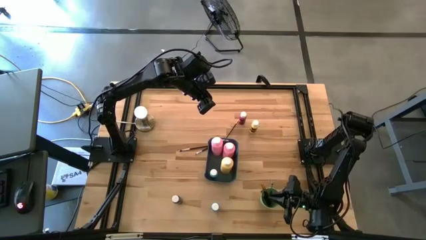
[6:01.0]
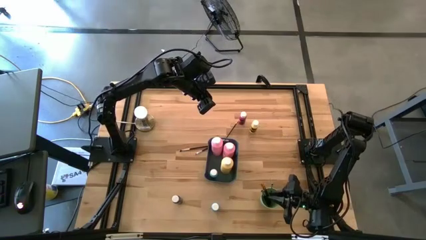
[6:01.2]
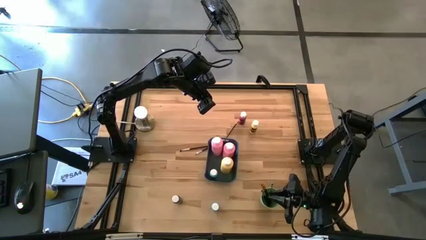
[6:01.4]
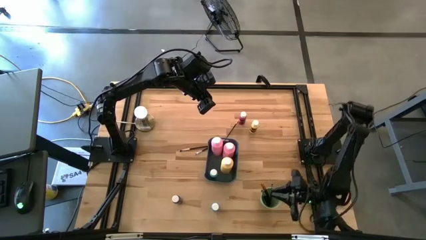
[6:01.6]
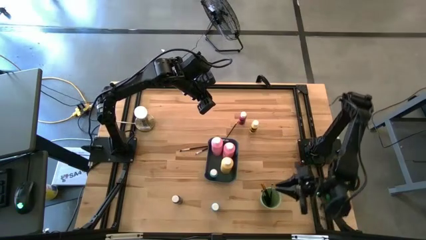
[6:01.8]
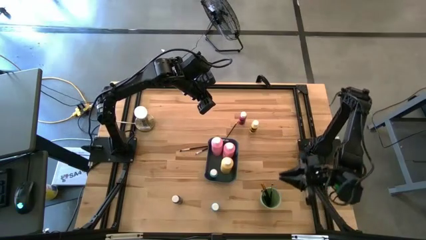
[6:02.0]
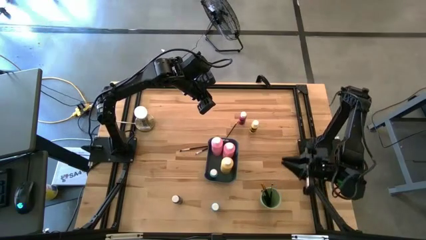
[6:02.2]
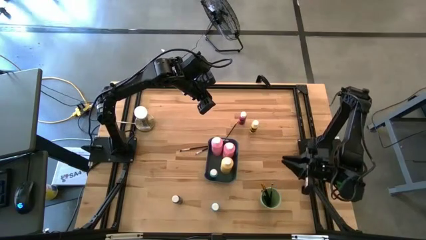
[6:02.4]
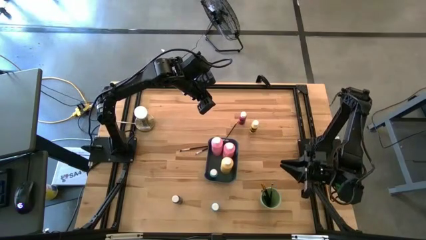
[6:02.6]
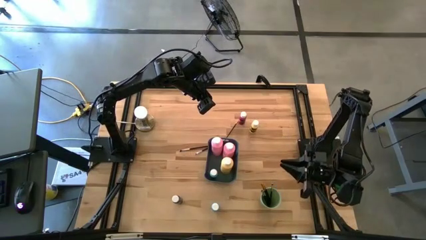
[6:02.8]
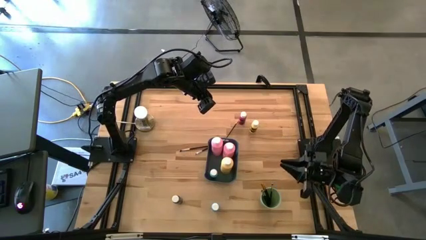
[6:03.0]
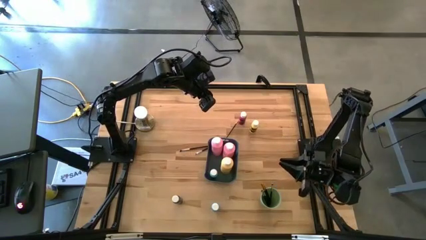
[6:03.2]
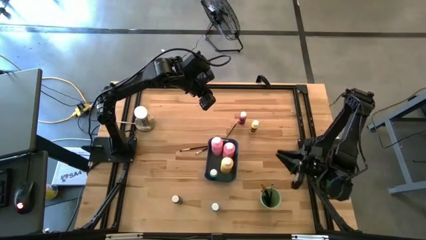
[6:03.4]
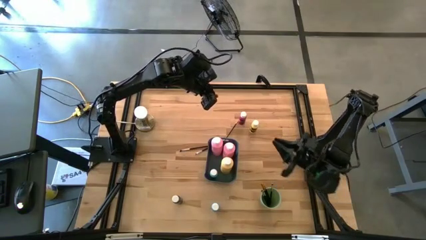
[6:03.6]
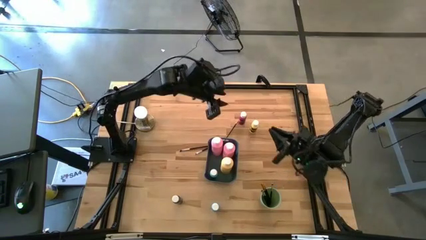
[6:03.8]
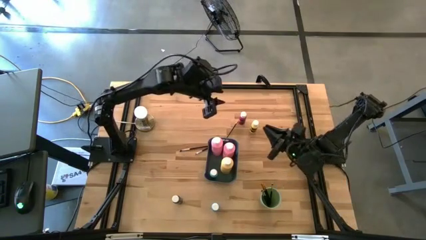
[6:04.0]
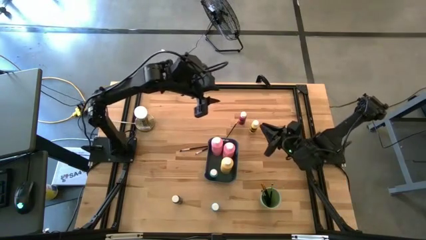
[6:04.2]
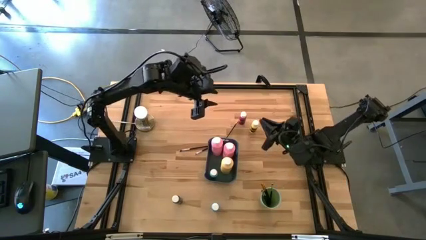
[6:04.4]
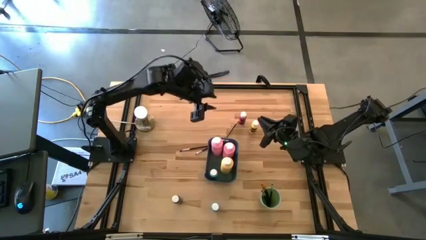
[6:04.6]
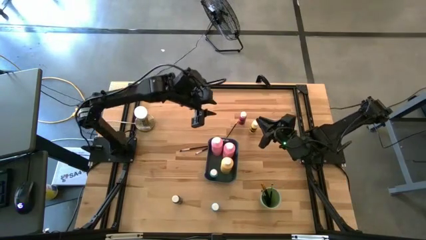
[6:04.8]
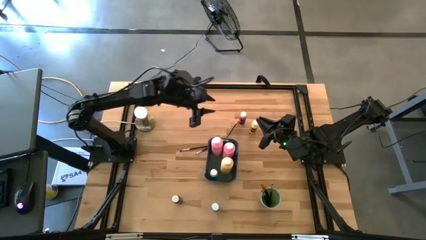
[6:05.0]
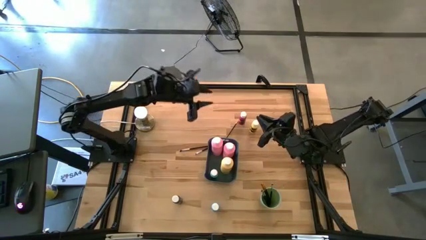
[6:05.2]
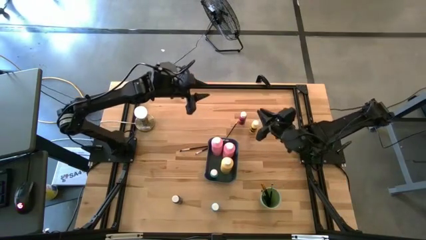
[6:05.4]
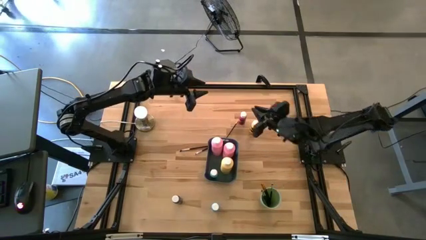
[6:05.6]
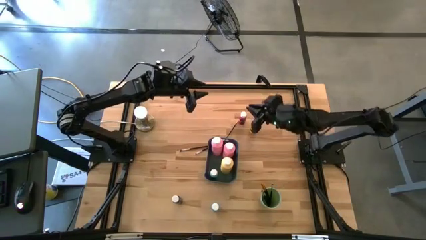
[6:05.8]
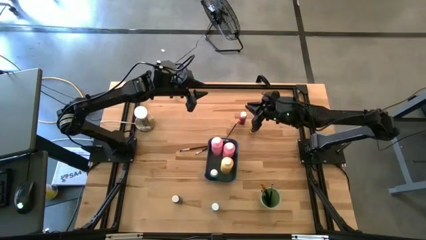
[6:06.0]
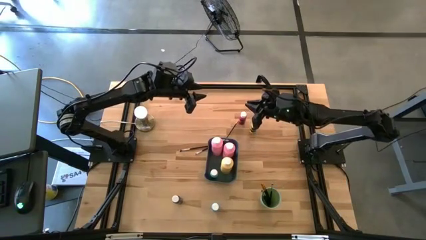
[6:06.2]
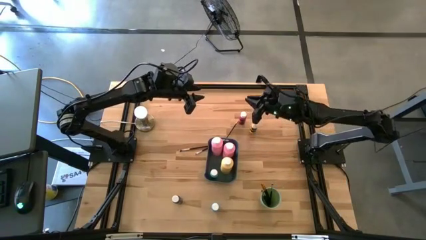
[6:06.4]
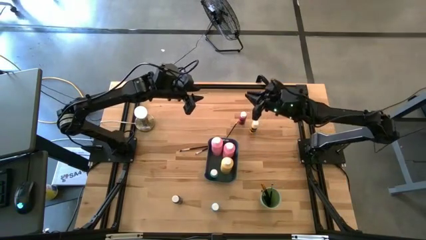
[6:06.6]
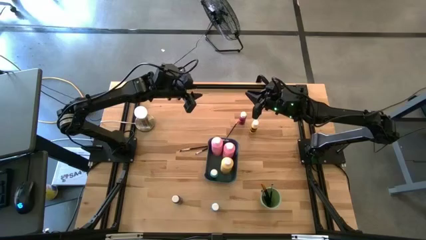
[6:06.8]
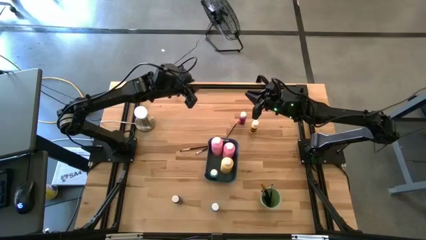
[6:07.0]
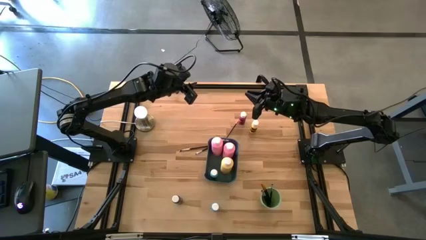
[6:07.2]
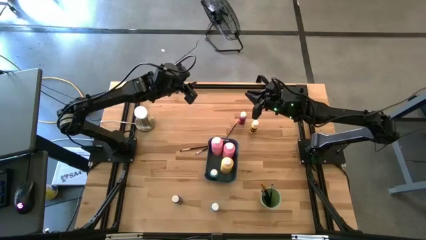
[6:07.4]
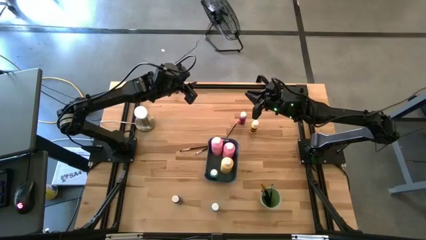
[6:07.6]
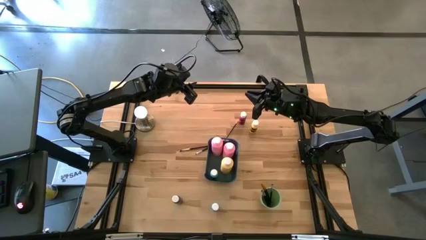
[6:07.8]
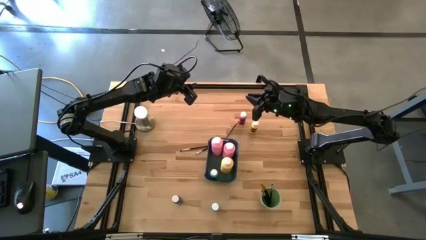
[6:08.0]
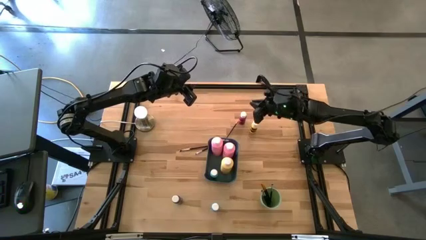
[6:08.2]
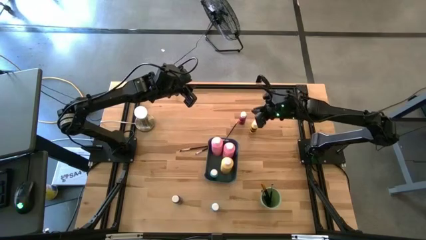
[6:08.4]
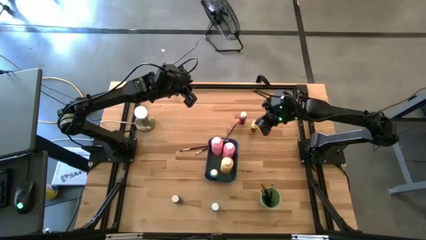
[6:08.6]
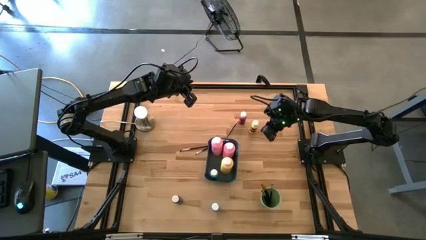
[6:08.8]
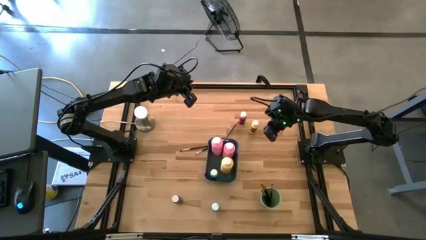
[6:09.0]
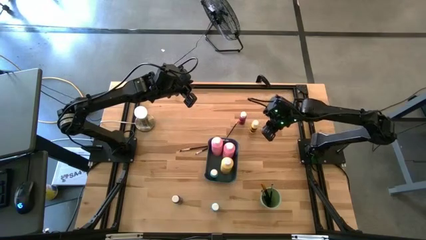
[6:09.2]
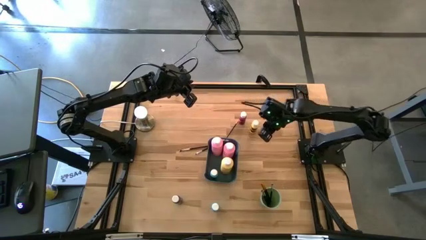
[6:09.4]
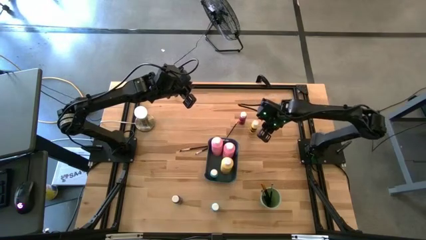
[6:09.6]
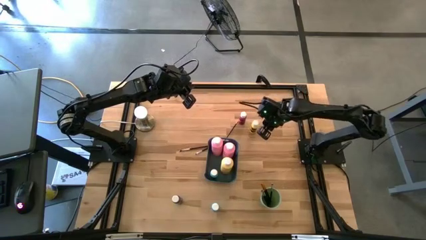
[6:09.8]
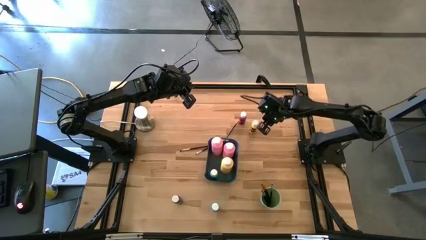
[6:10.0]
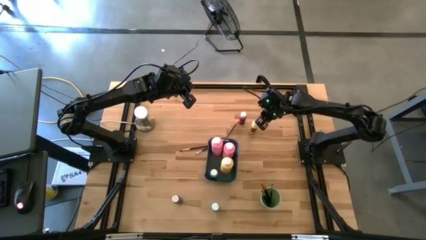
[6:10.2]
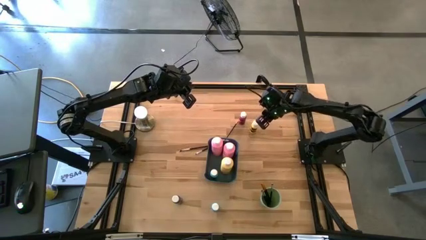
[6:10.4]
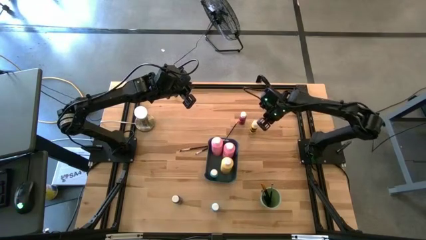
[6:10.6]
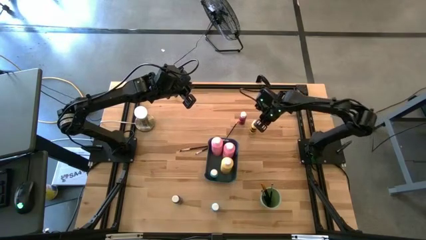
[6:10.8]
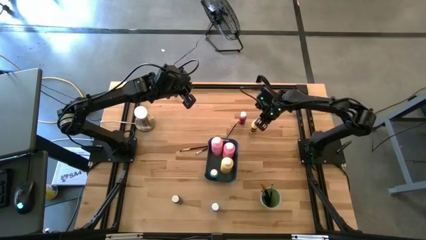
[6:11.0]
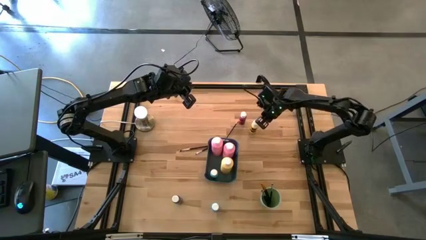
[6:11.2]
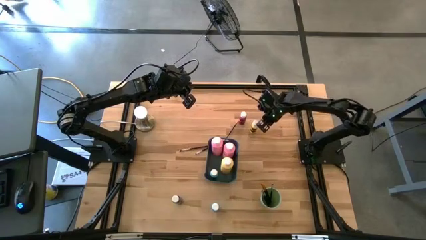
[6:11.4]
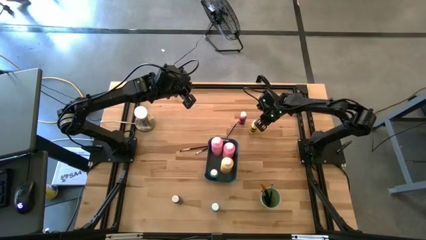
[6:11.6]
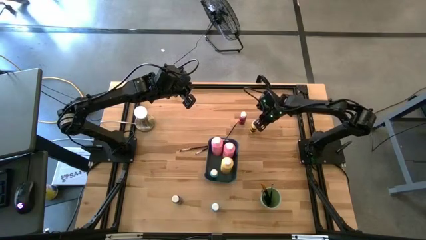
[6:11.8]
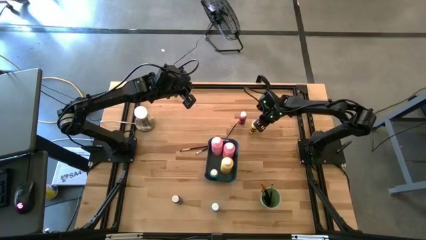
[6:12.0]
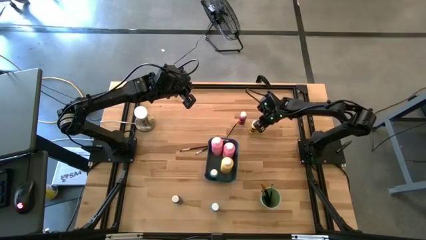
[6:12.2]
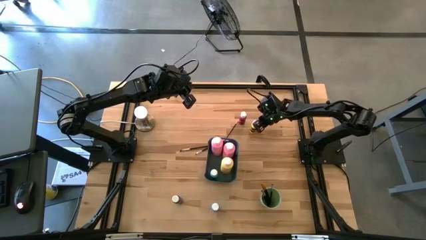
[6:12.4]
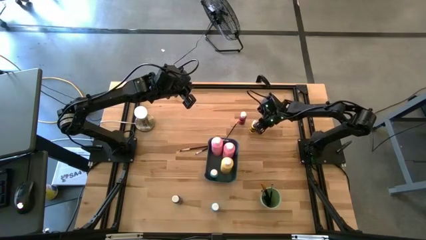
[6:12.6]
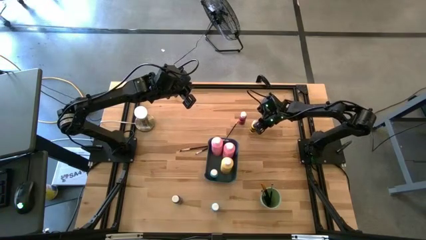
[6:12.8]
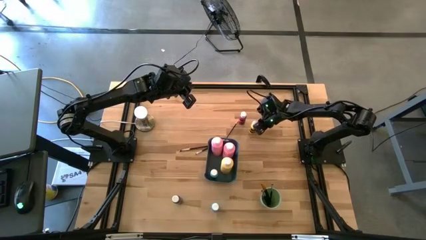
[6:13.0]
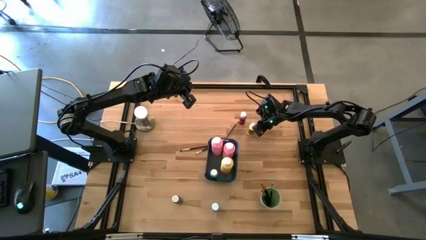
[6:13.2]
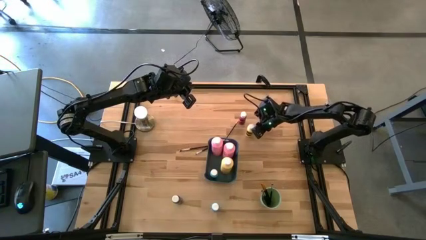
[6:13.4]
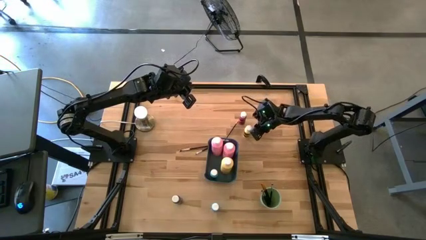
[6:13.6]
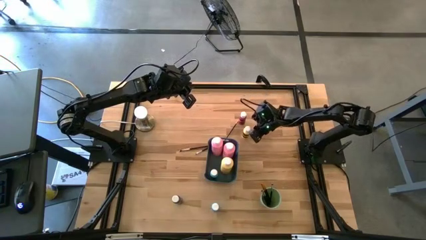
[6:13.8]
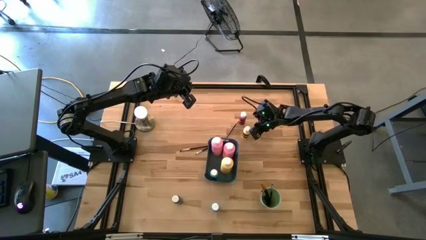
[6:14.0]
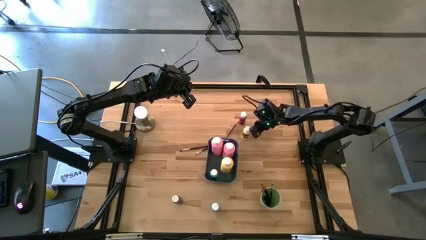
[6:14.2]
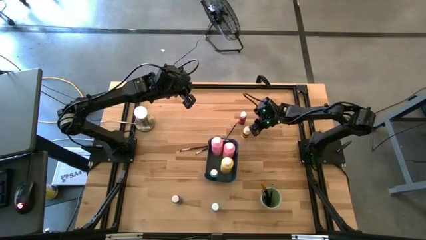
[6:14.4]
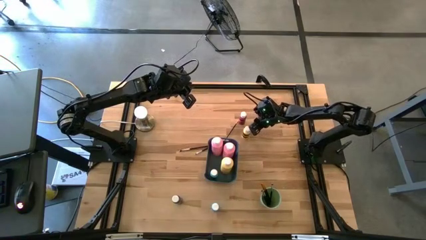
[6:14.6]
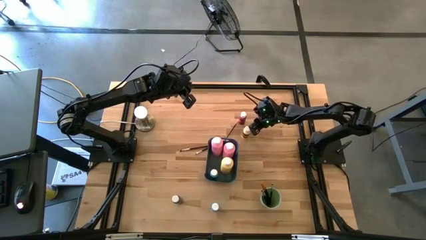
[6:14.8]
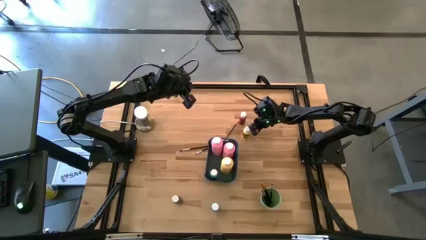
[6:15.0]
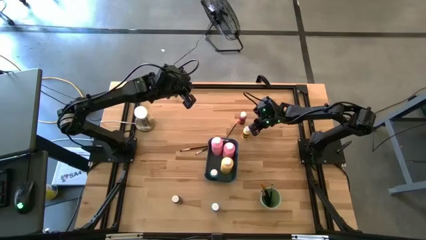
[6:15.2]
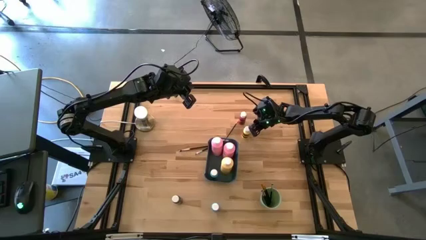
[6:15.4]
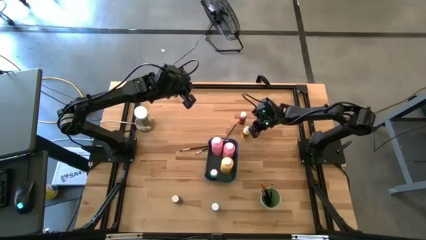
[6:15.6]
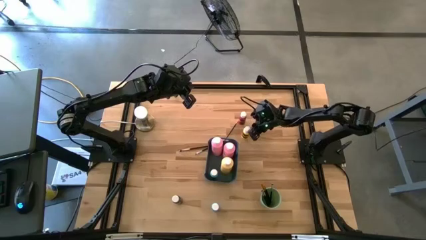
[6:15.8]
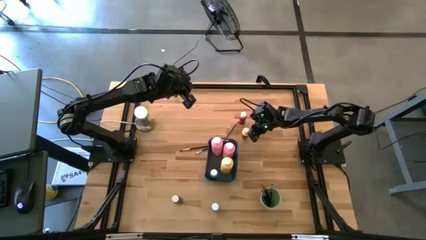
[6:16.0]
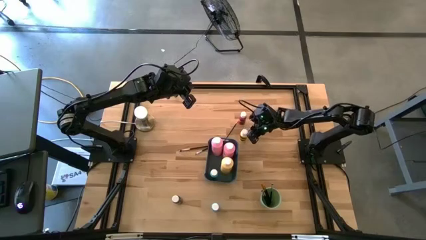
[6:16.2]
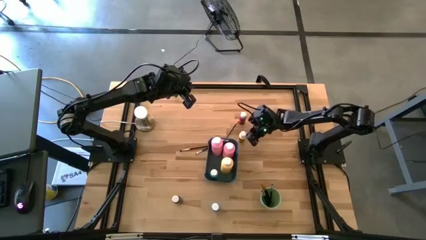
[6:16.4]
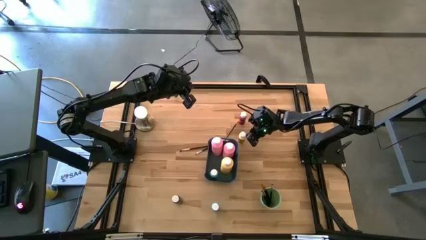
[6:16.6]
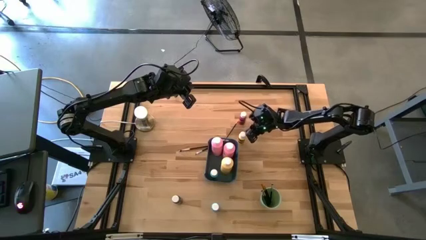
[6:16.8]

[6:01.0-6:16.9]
Task: Pick & Place Paint Supplies
Adjust the small yellow bottle
